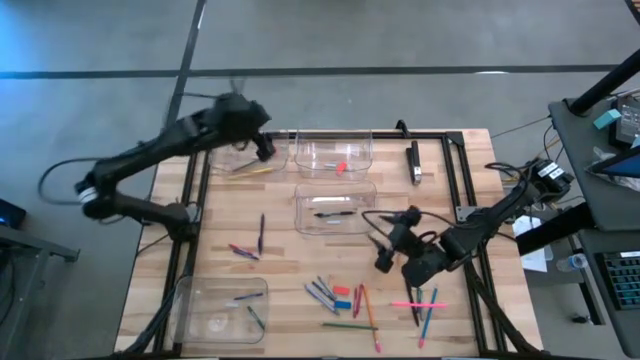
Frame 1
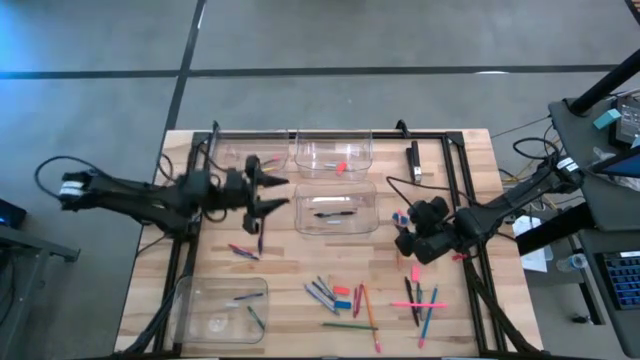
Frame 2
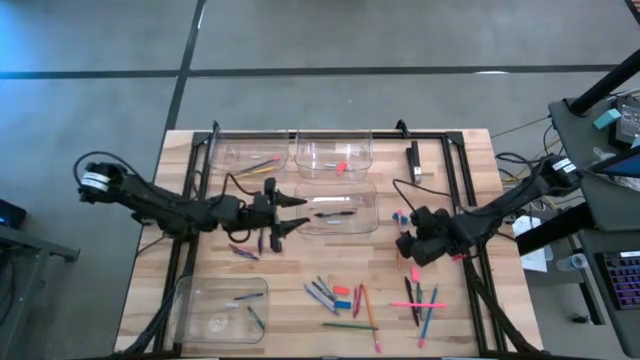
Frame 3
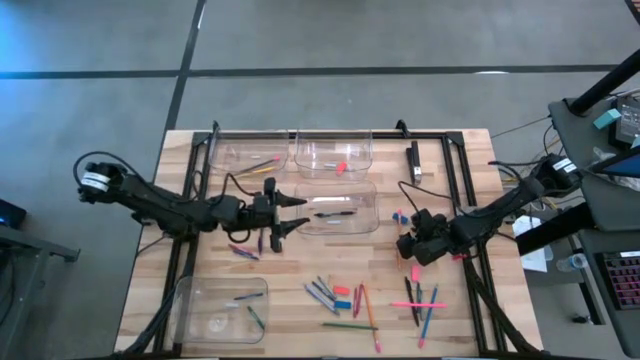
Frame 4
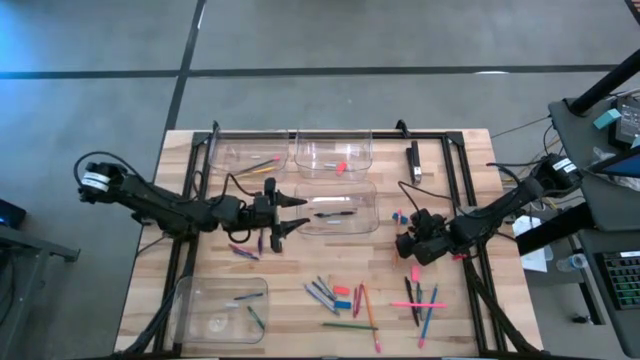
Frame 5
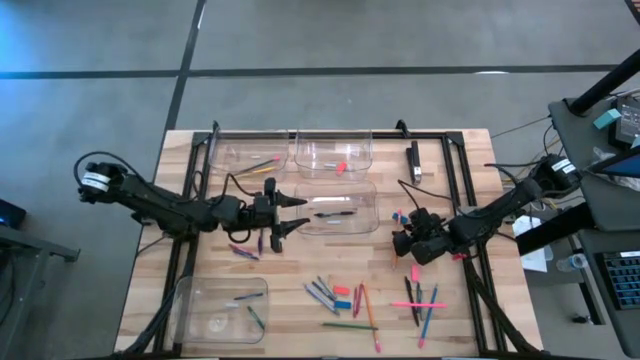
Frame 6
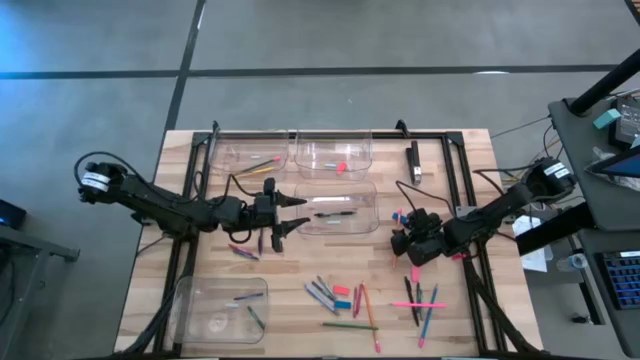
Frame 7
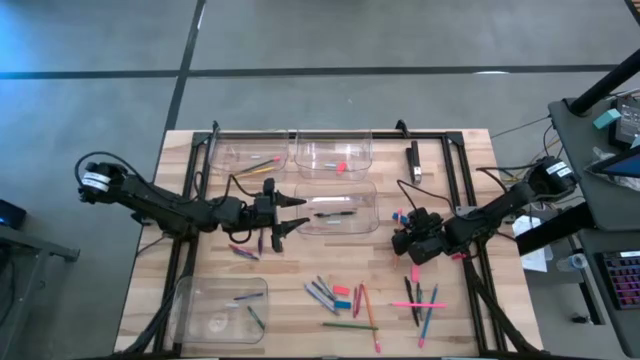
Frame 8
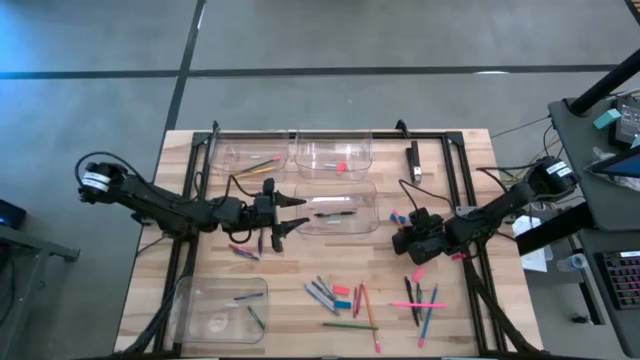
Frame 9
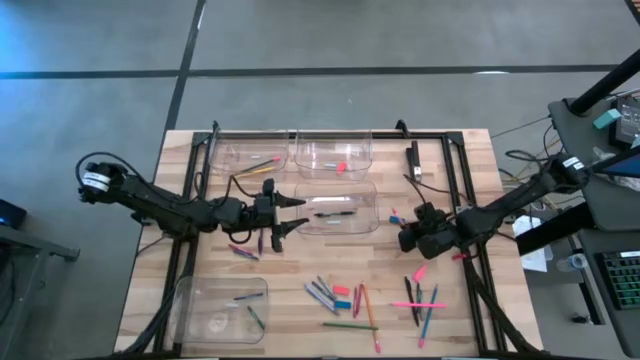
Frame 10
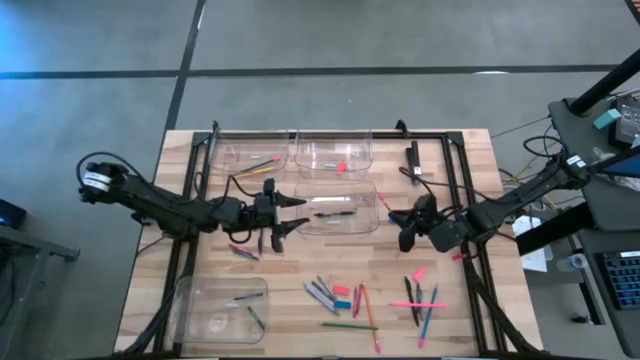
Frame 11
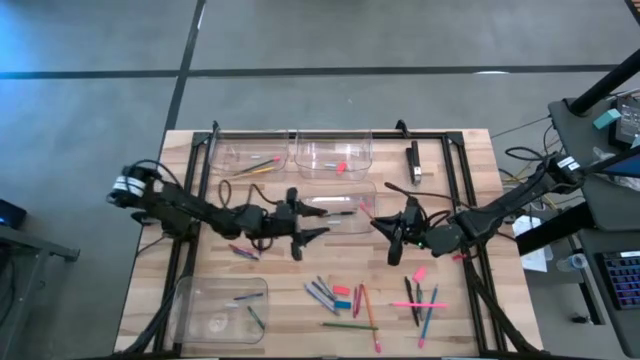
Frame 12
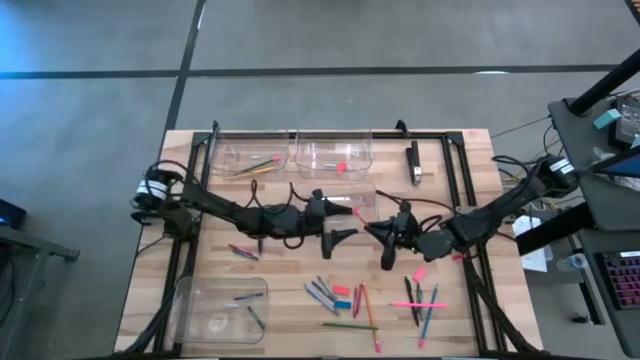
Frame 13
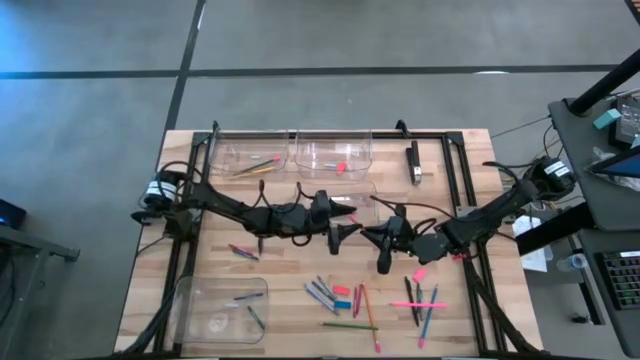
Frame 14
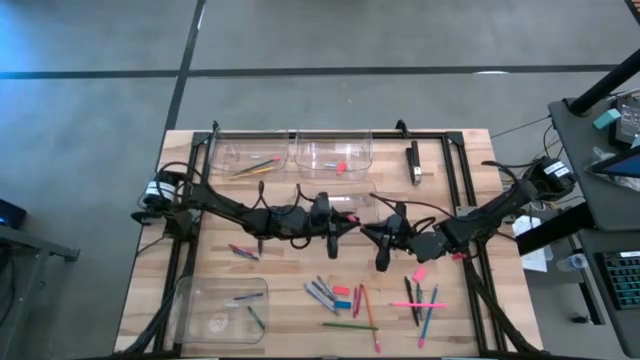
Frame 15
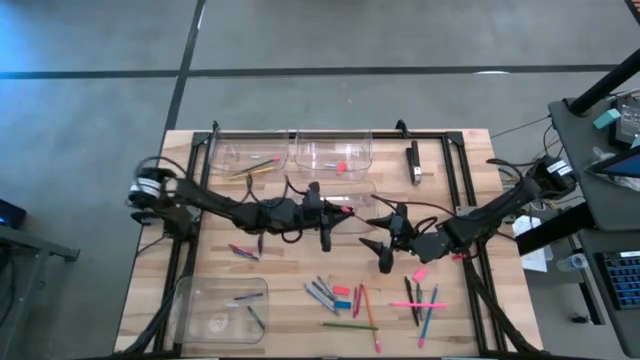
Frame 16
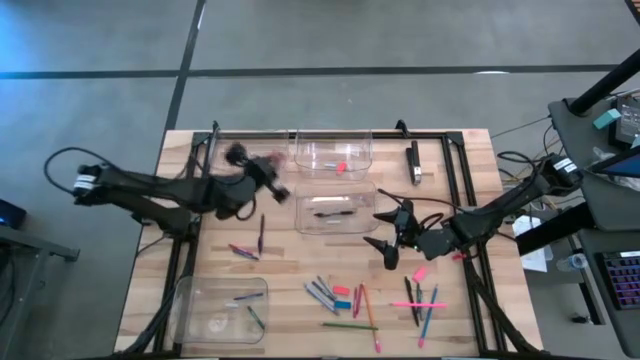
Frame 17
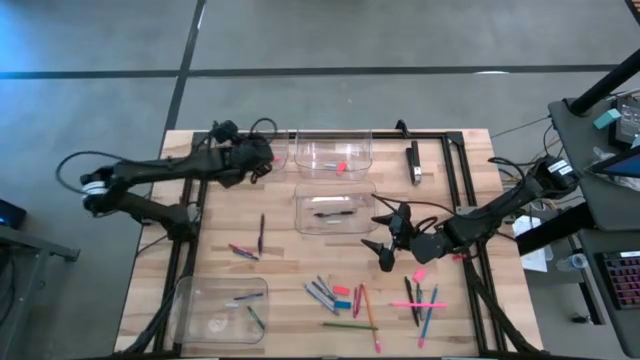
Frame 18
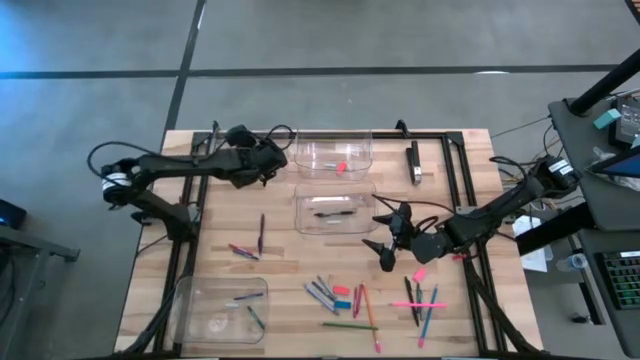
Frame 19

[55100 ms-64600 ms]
Task: Sort crayons/erasers/pens/pencils in bins
Put the top orange pencil into the top left transparent bin

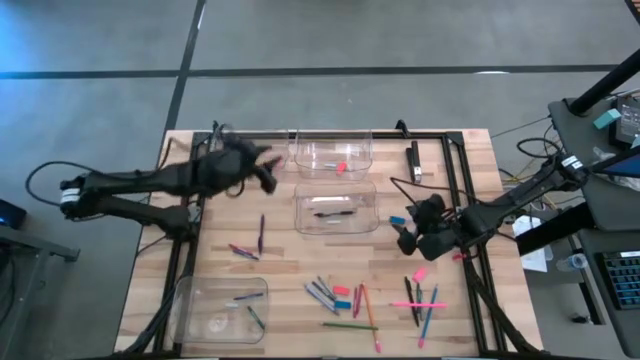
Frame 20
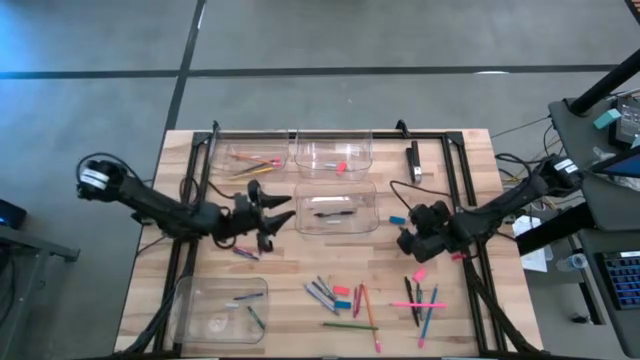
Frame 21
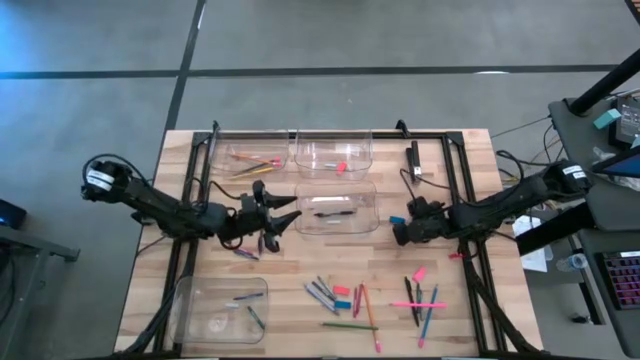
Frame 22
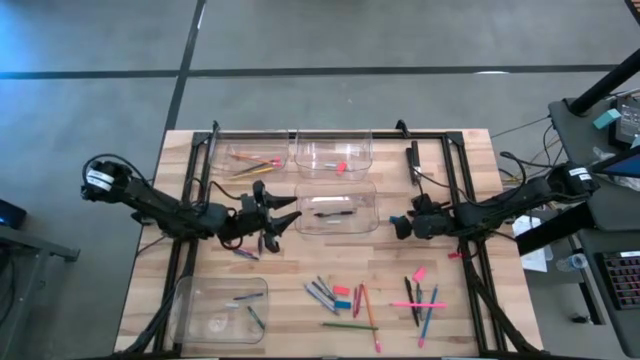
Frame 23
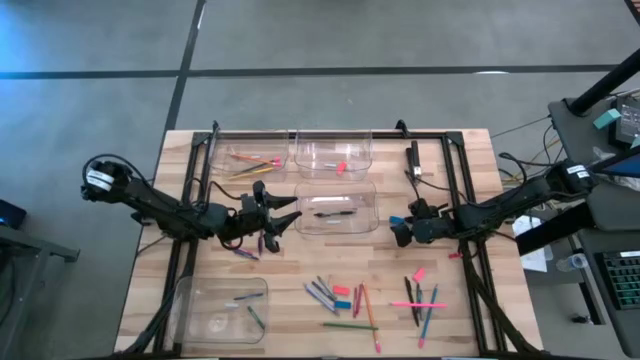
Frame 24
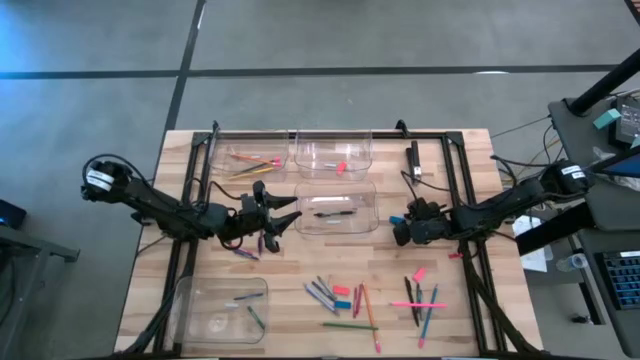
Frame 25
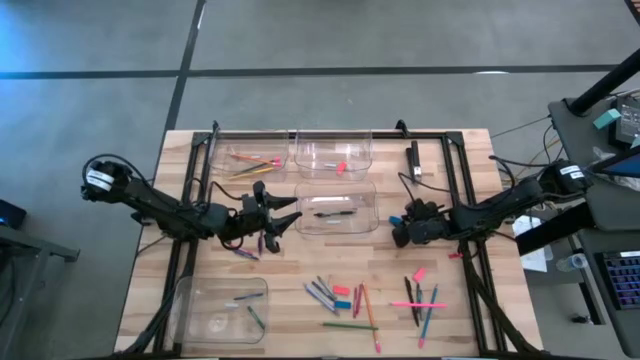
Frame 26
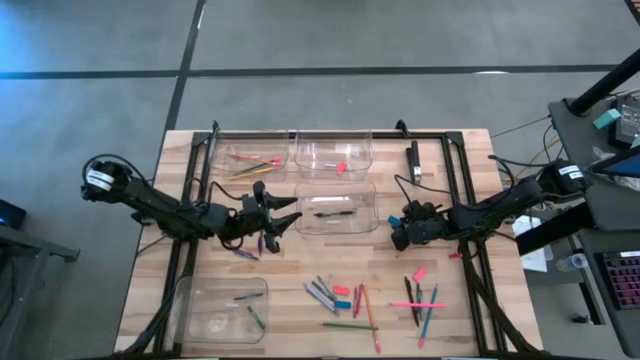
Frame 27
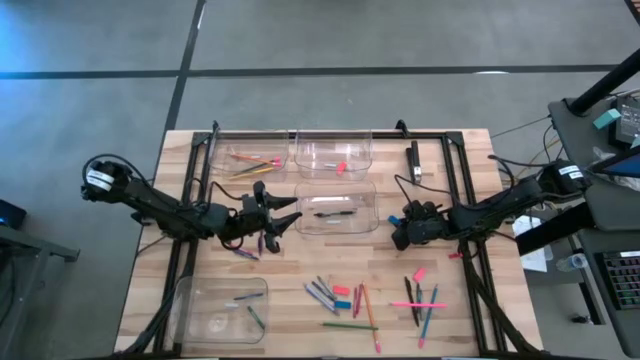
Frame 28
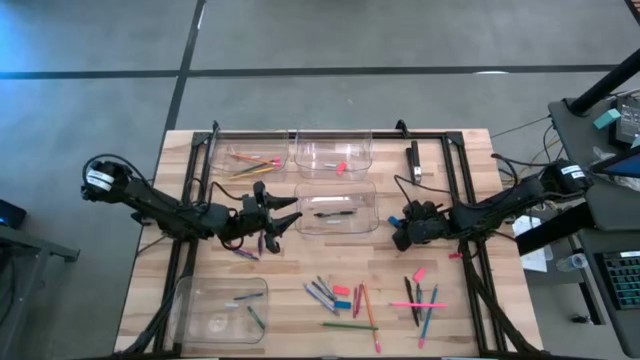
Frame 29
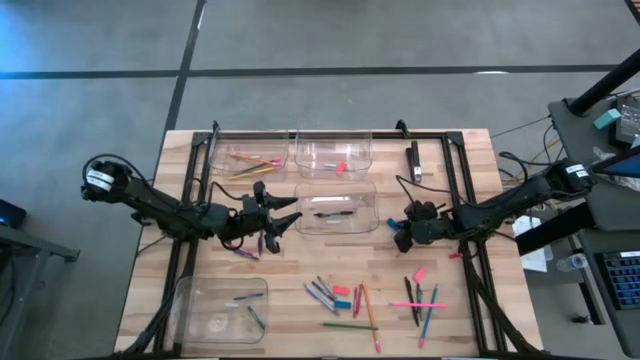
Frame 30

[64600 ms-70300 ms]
Put the top blue eraser into the top right transparent bin

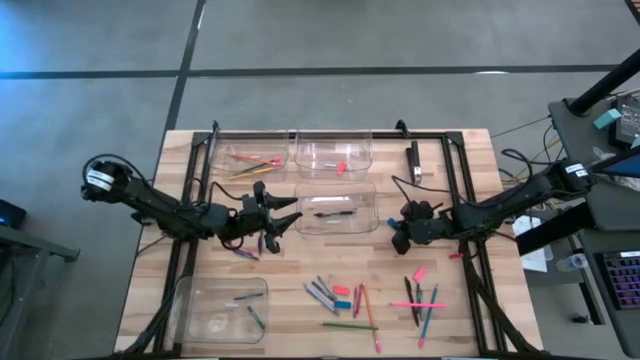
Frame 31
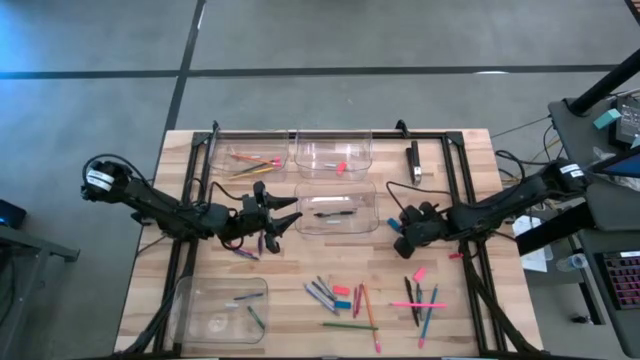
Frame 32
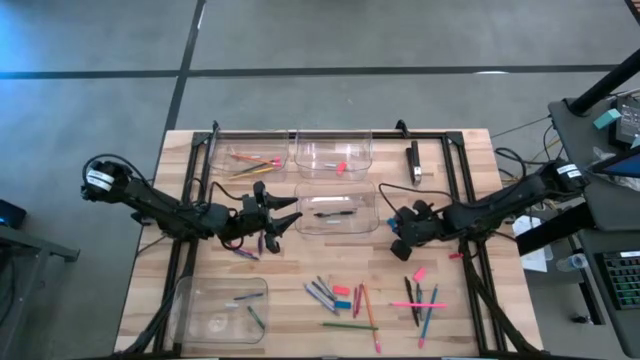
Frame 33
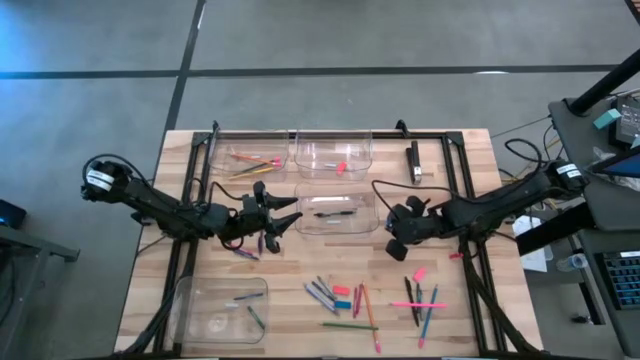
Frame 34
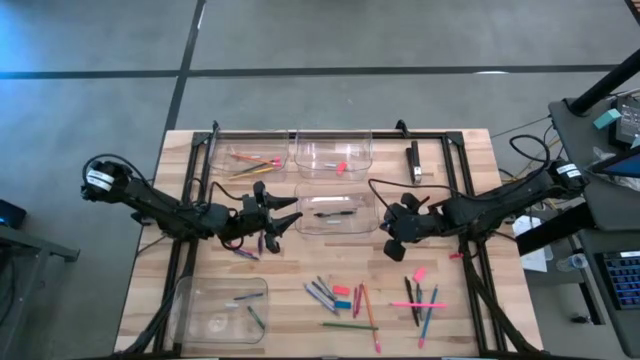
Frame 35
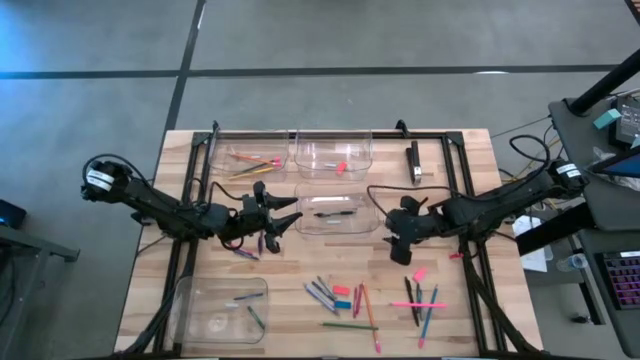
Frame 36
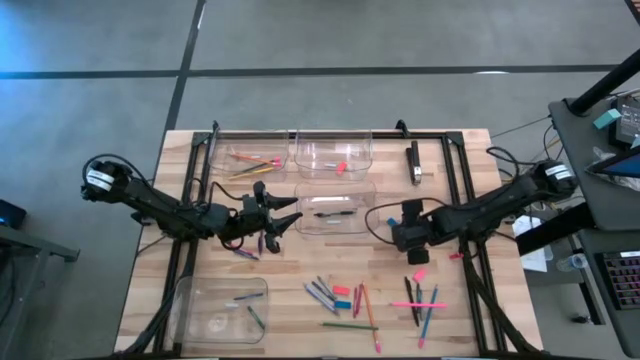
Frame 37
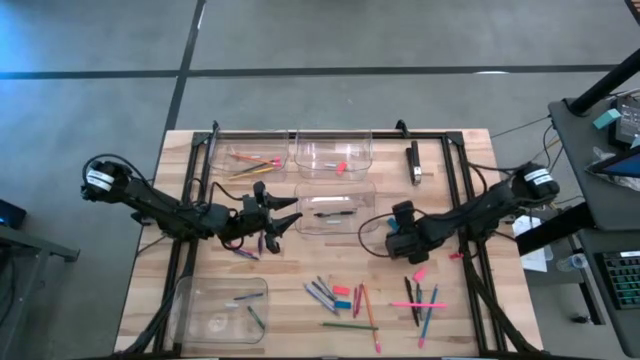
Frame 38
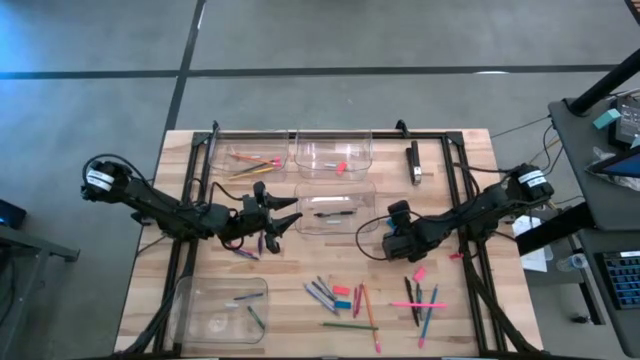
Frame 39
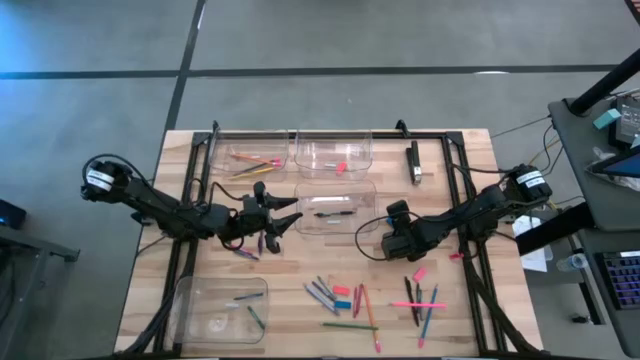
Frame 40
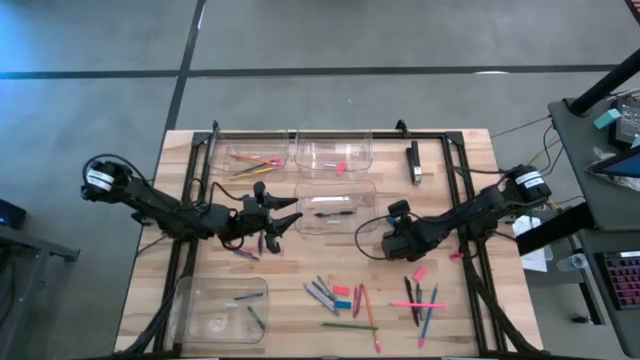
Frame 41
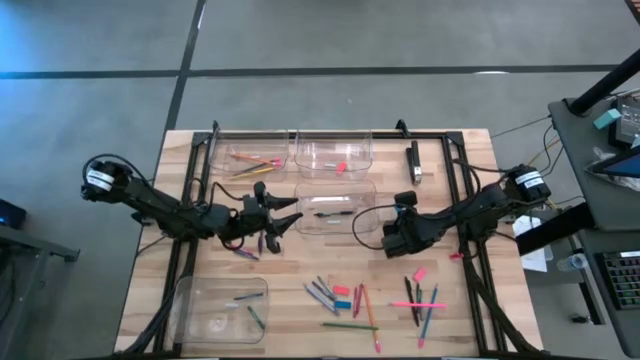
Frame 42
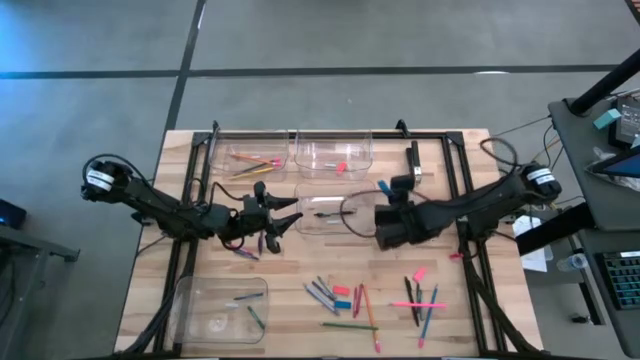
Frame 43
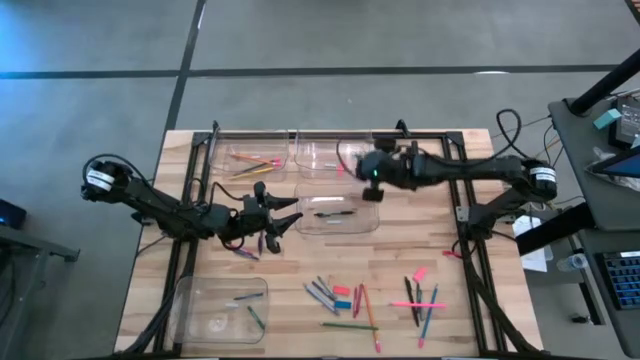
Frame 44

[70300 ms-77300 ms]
Put the top blue eraser into the top right transparent bin
